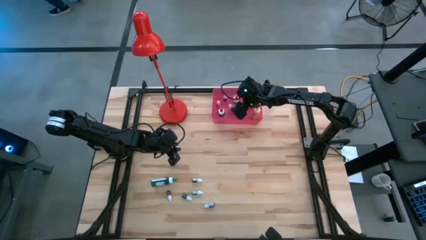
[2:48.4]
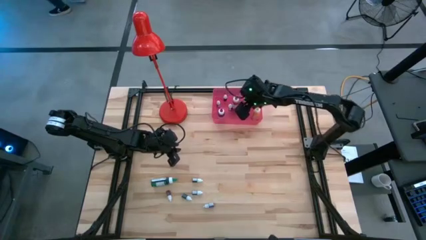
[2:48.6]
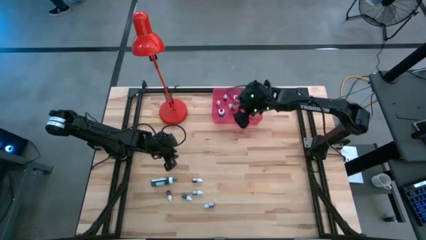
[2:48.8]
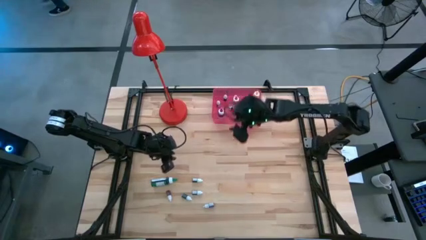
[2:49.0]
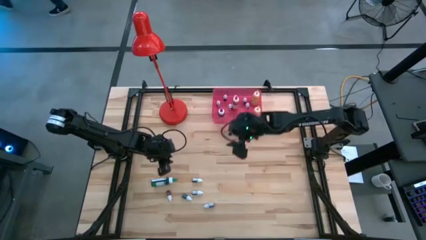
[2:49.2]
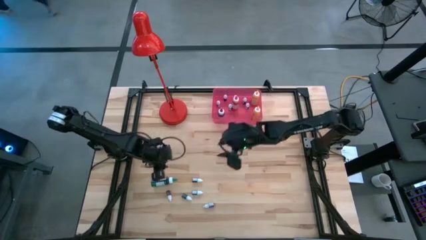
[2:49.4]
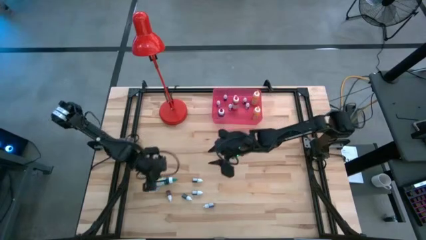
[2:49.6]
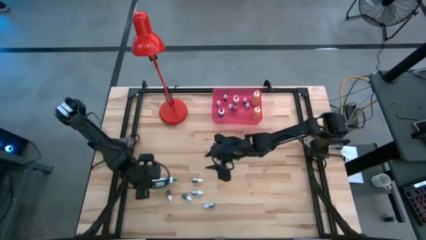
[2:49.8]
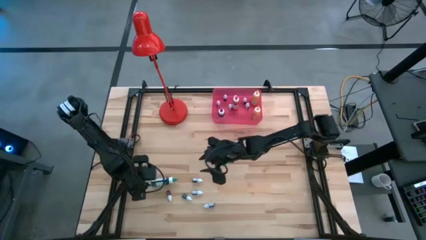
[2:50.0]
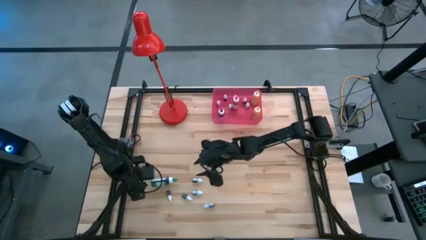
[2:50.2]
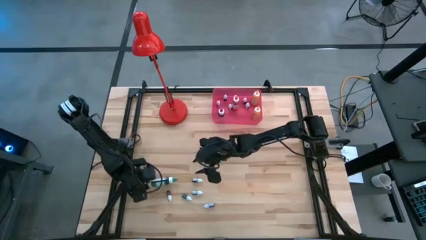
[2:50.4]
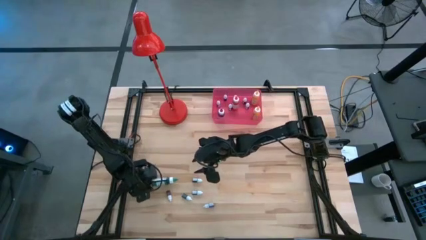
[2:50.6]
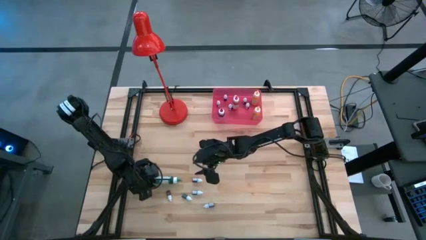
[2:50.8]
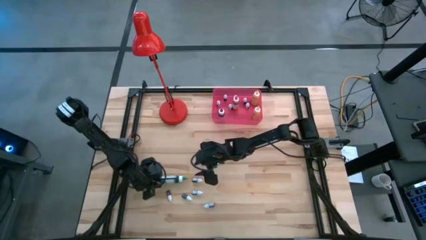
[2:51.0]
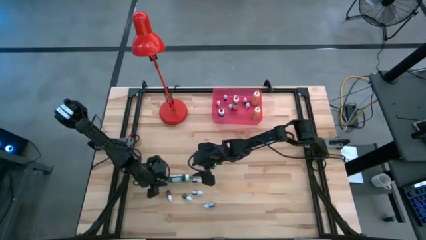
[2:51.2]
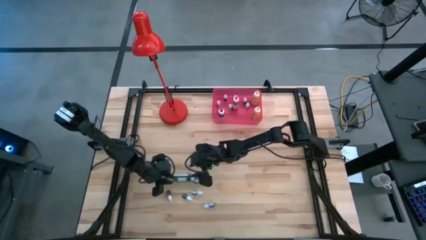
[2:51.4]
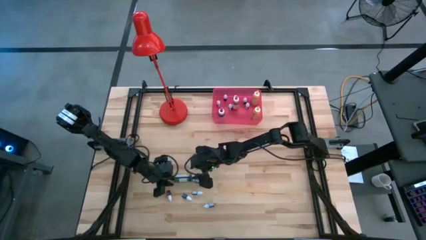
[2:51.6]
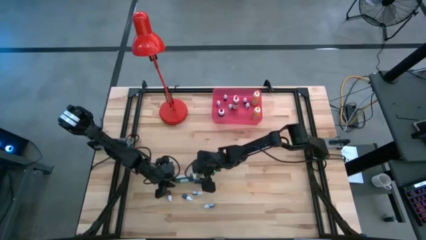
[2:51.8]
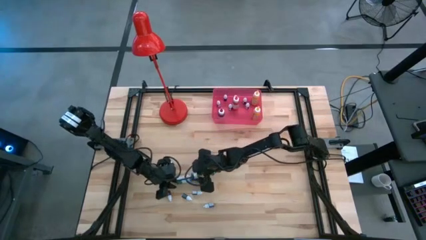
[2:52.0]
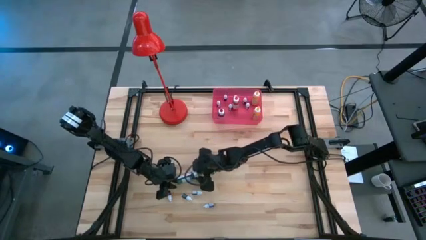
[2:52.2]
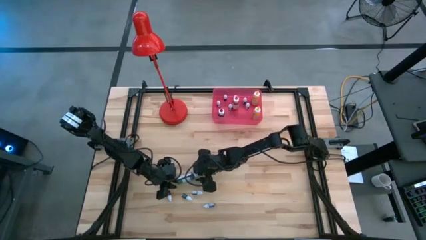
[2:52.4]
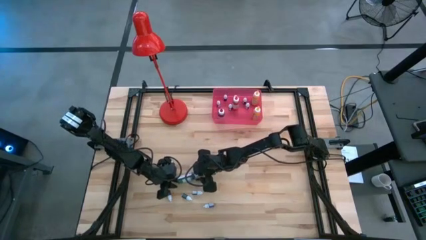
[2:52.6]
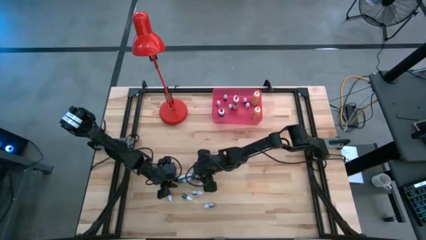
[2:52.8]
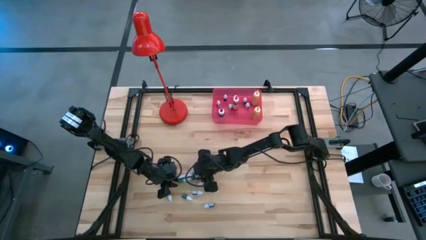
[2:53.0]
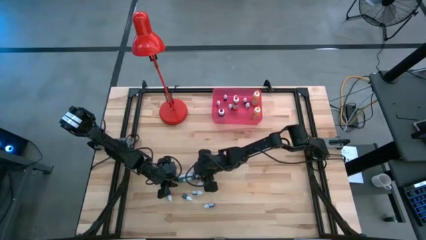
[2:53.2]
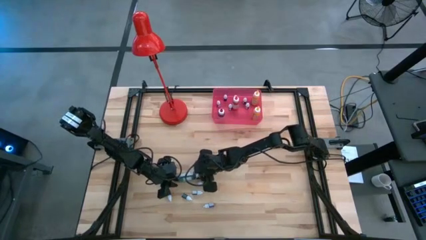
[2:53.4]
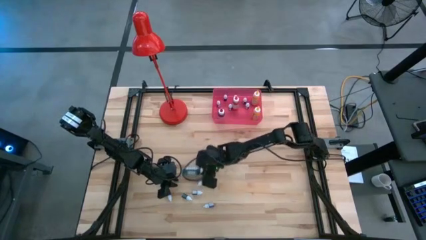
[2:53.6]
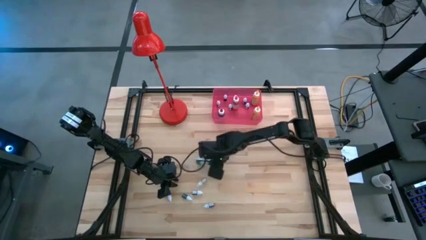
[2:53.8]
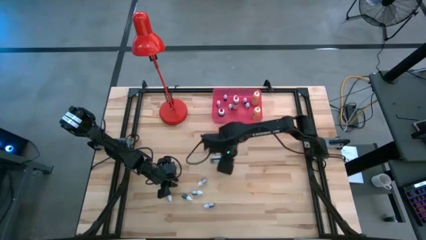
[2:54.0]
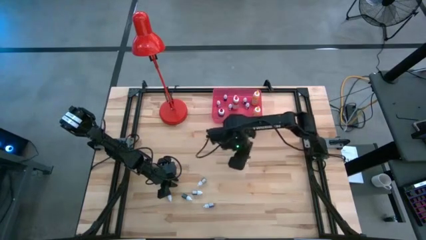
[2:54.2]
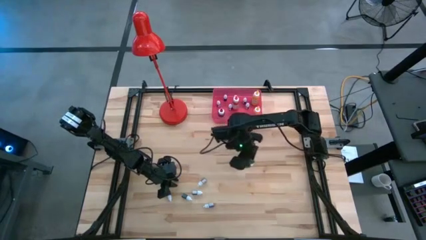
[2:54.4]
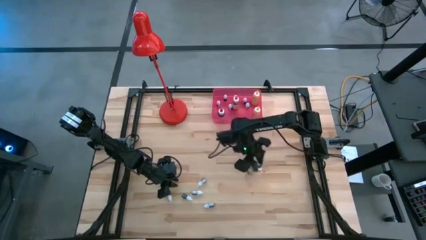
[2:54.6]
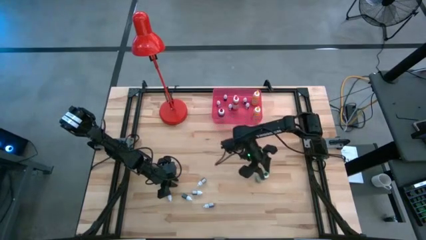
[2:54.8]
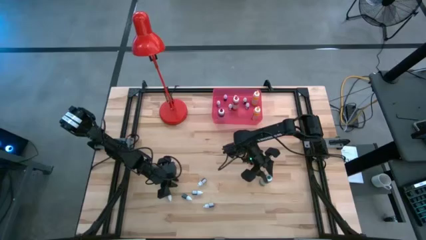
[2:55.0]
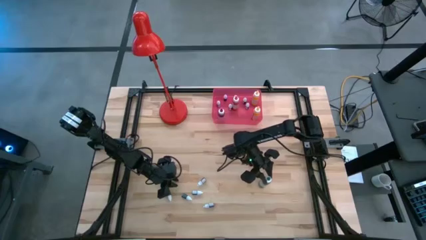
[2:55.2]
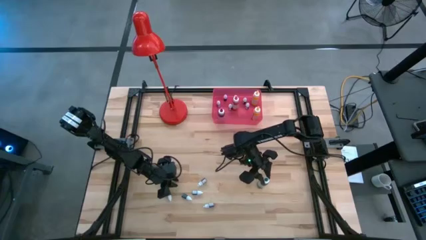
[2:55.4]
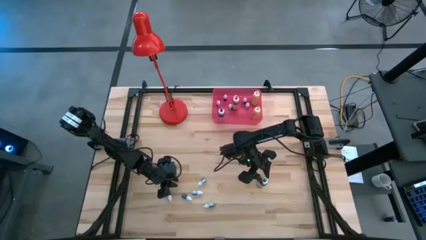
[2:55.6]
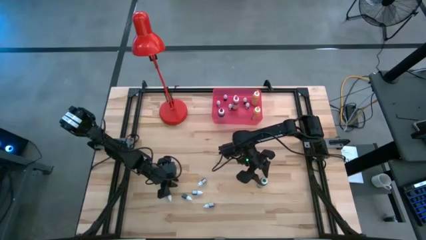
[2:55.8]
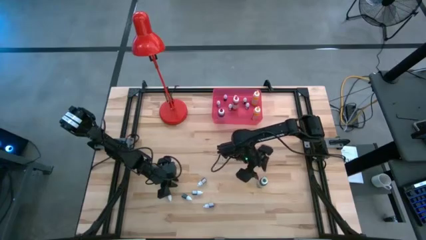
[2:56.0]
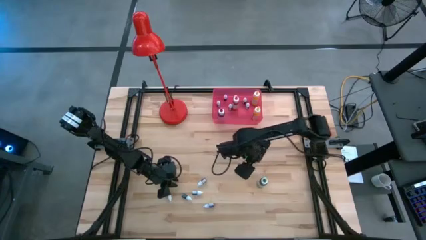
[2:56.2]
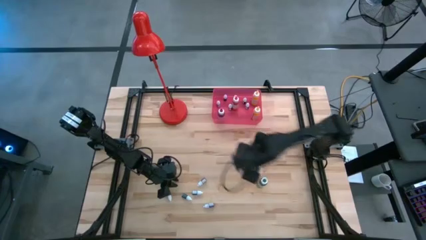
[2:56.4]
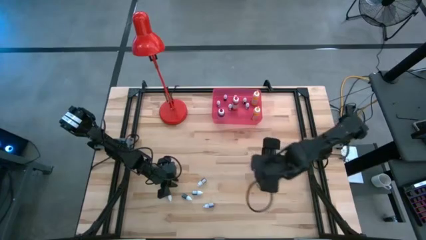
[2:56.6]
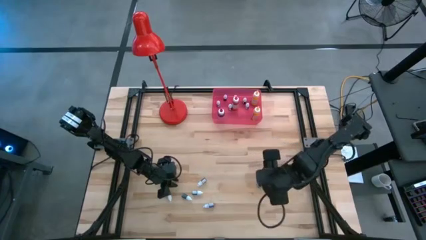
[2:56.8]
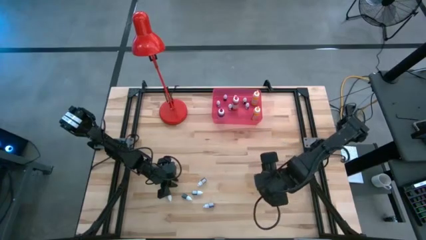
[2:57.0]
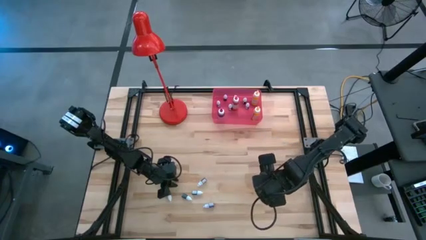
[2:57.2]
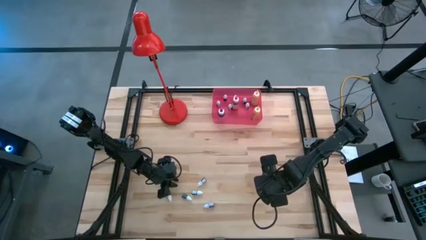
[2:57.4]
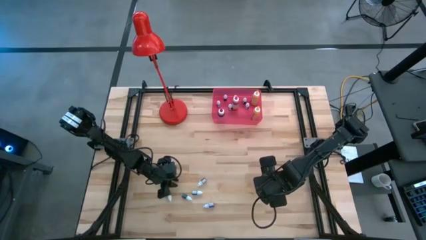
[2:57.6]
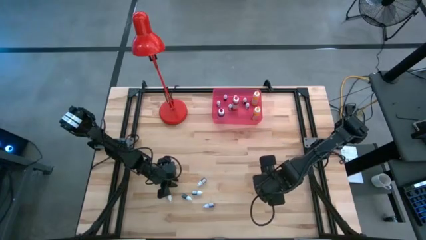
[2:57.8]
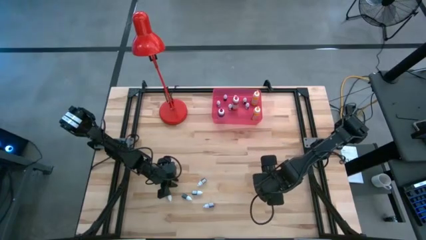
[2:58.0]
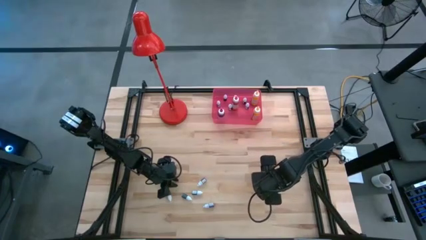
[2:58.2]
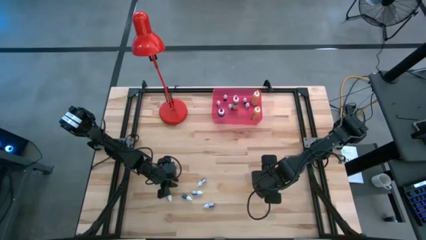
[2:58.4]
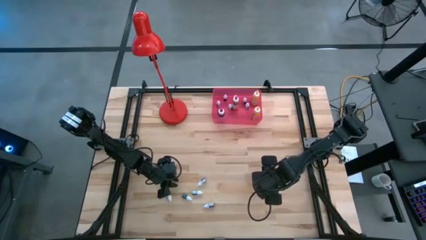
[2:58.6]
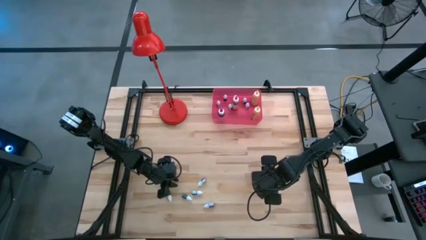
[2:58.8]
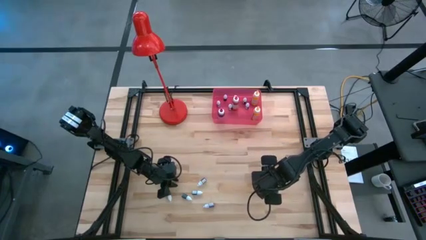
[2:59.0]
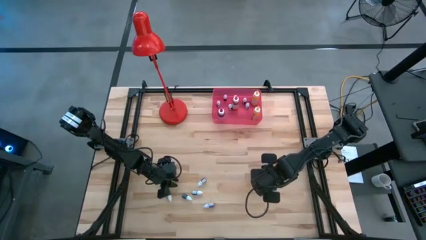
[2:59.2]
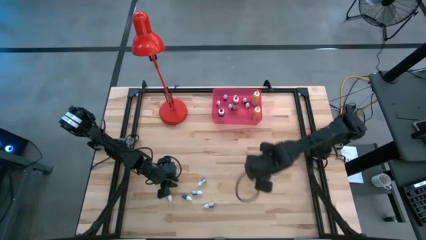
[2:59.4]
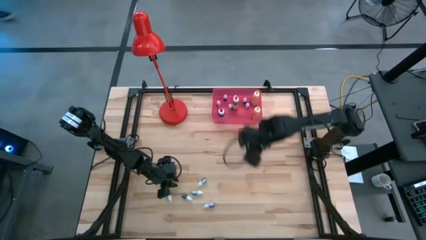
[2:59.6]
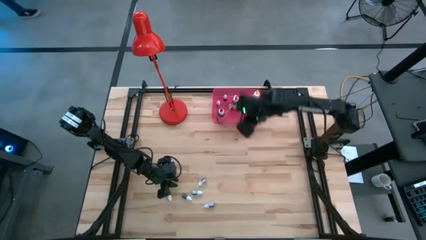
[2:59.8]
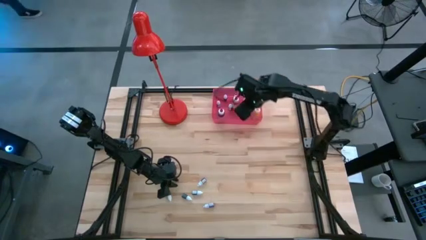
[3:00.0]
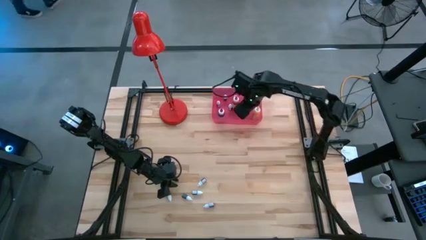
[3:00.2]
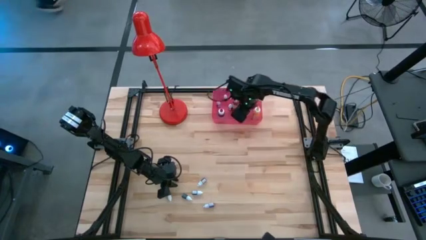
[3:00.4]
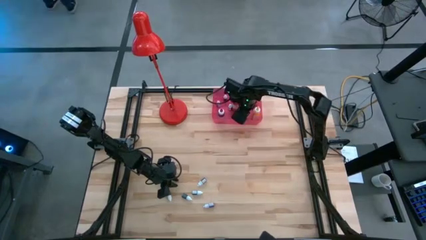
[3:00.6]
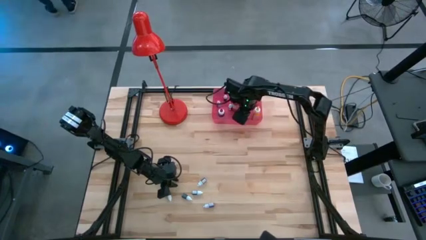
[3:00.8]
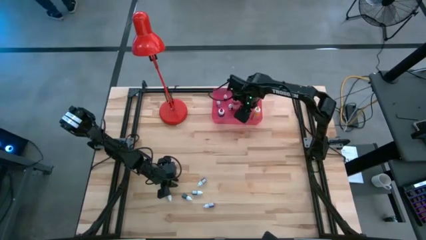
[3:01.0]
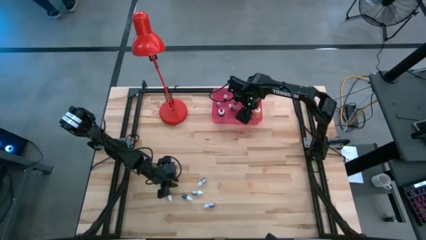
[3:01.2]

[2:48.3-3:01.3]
Task: Pick & Place food coloring
Put the large green food coloring bottle into the red bin

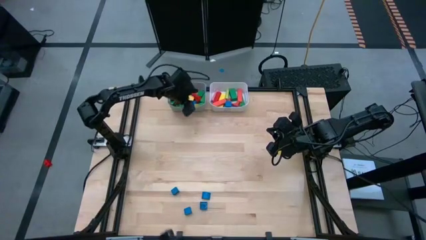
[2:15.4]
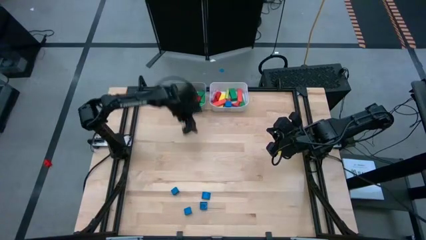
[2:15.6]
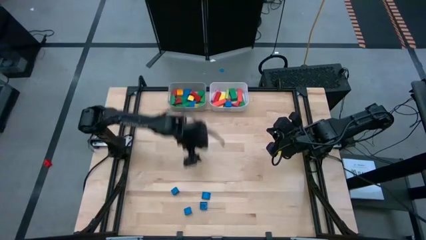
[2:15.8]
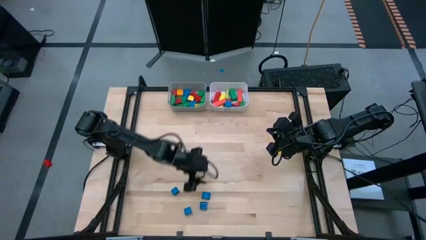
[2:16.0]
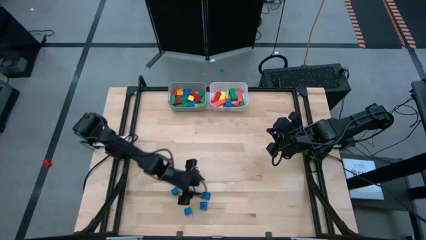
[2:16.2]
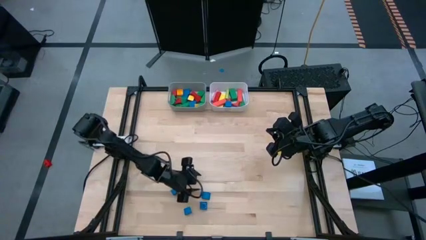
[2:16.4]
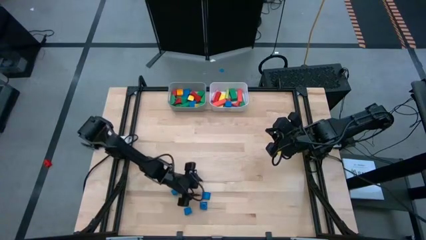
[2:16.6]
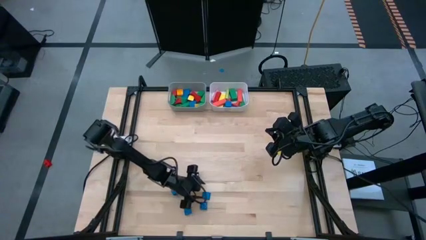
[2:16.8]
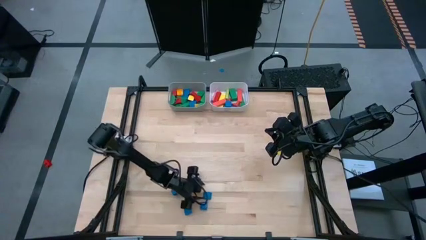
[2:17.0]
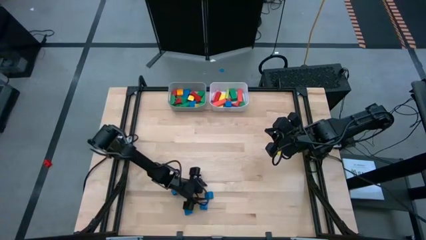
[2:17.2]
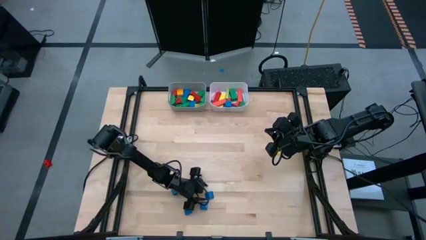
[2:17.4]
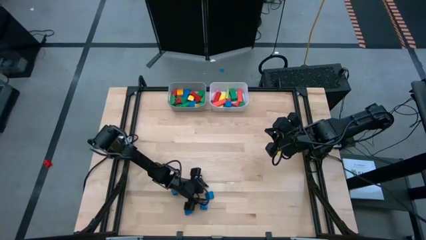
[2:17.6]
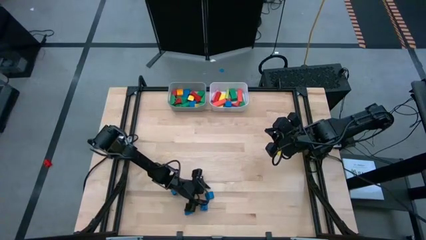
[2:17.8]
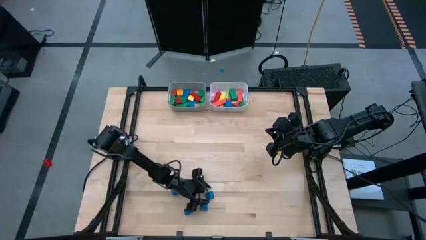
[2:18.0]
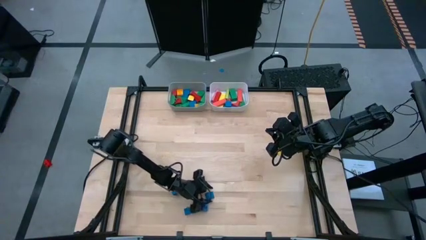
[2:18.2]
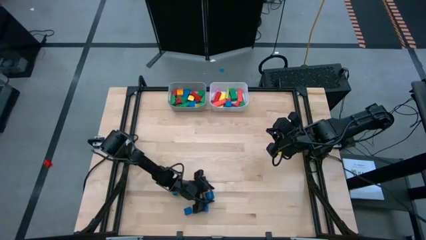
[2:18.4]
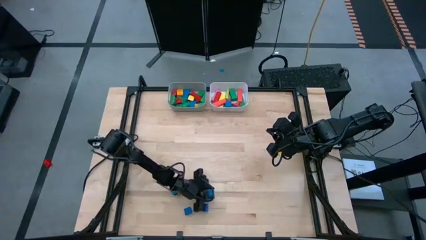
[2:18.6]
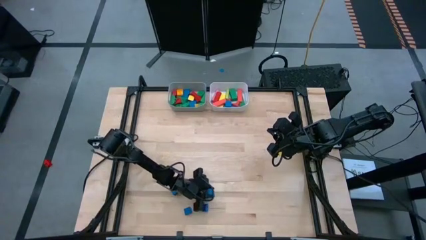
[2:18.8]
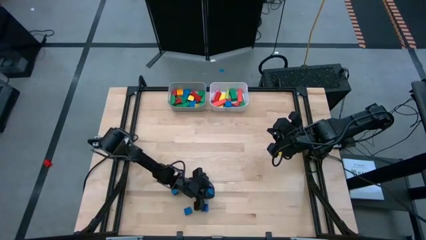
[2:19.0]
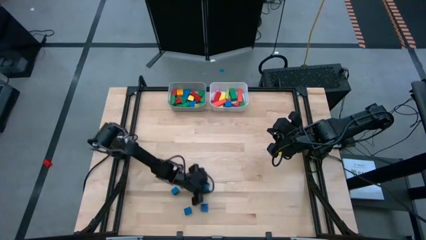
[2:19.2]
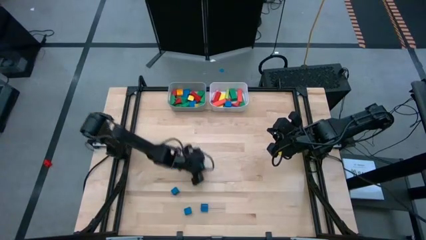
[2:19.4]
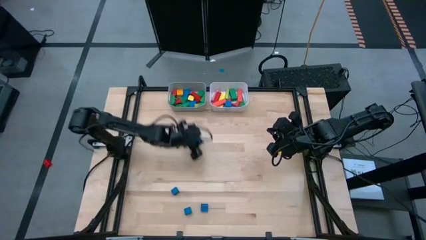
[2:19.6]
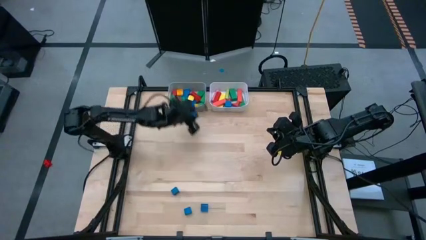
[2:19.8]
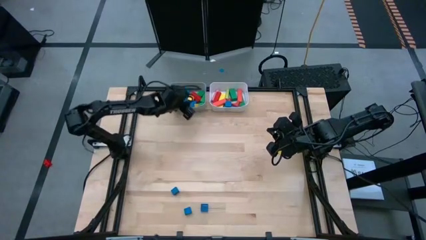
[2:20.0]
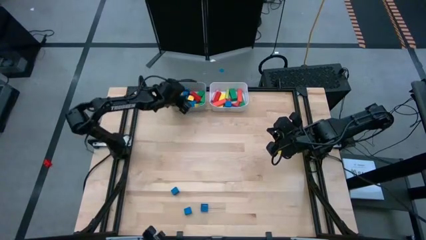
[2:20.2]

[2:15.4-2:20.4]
Task: Sort blocks by size
Put the blue half-circle block into the gray bin
